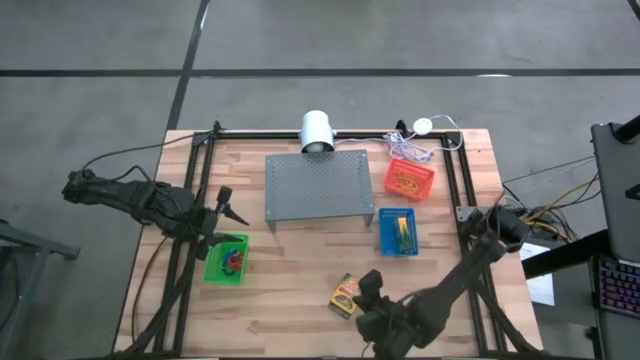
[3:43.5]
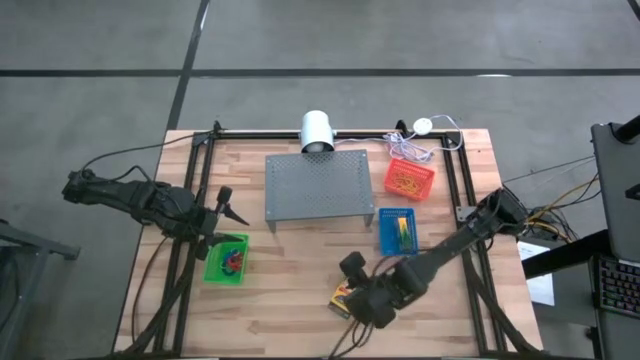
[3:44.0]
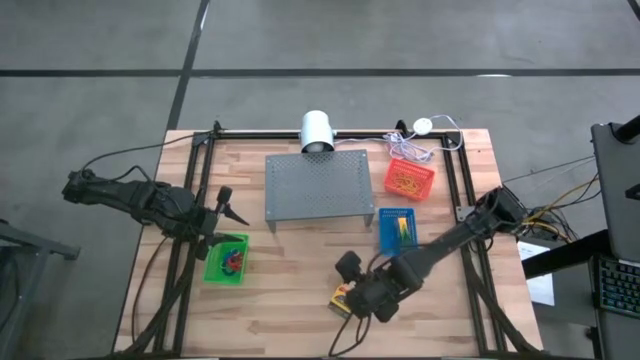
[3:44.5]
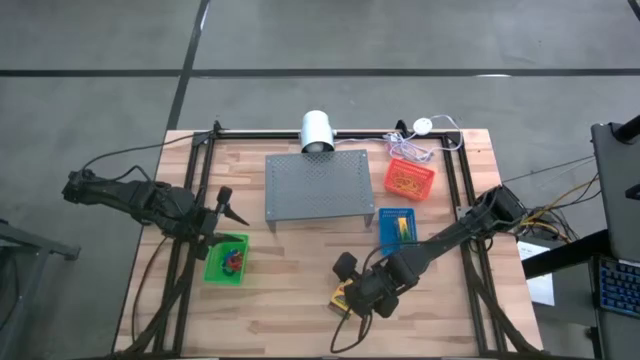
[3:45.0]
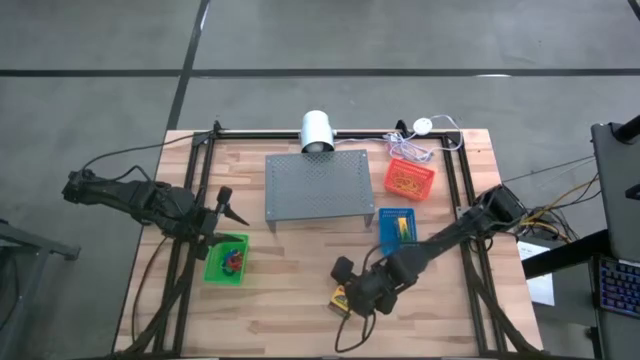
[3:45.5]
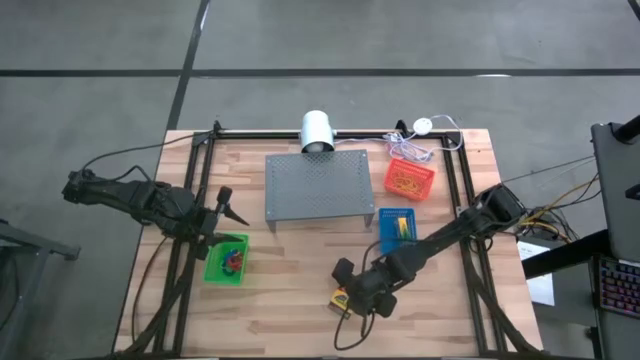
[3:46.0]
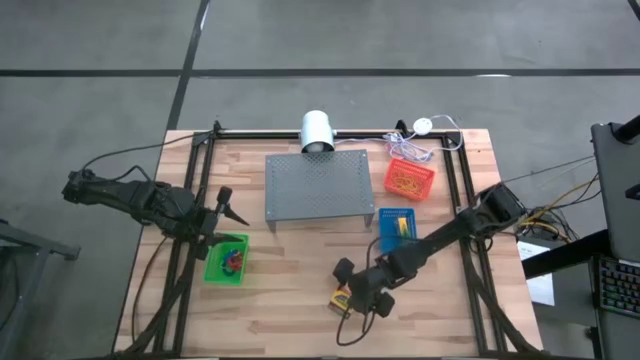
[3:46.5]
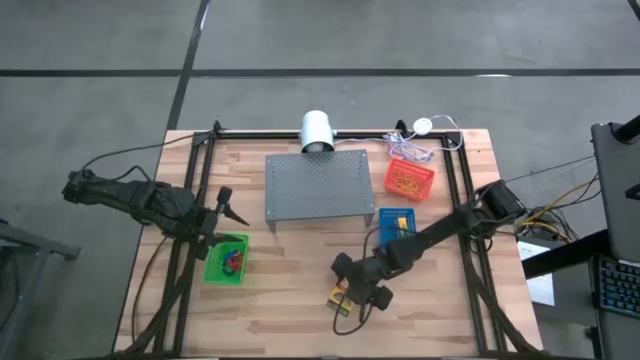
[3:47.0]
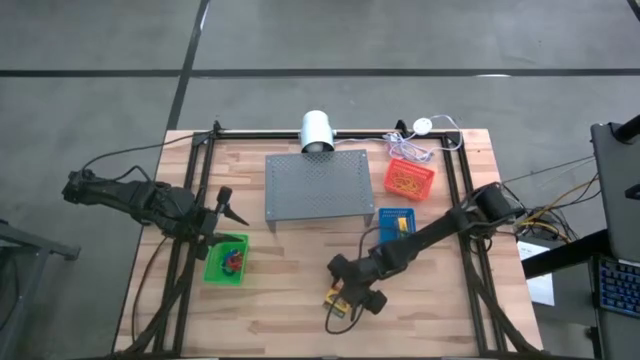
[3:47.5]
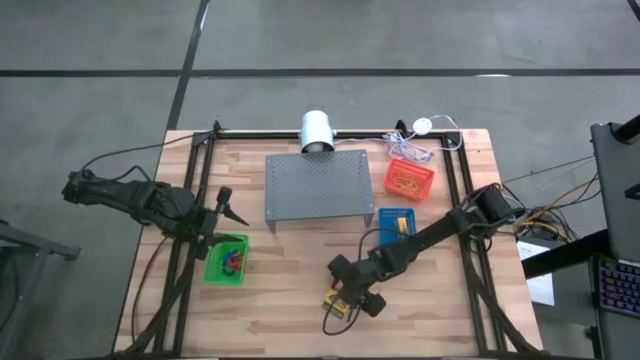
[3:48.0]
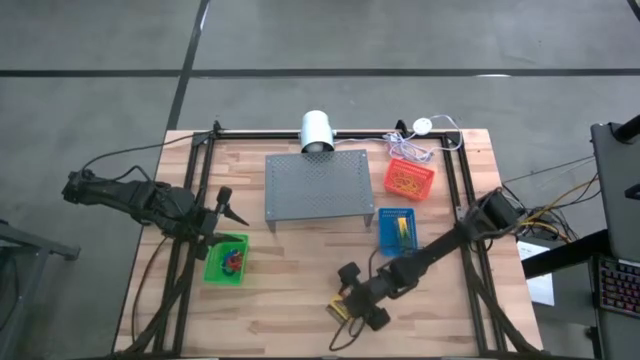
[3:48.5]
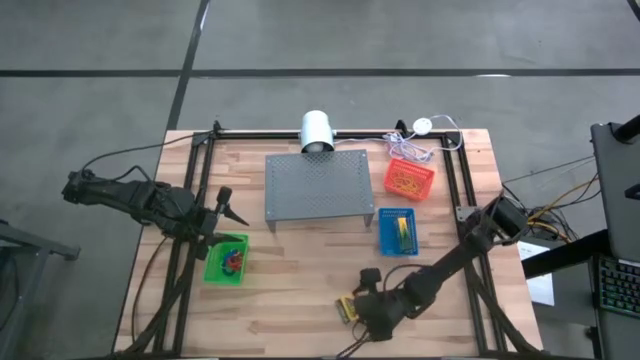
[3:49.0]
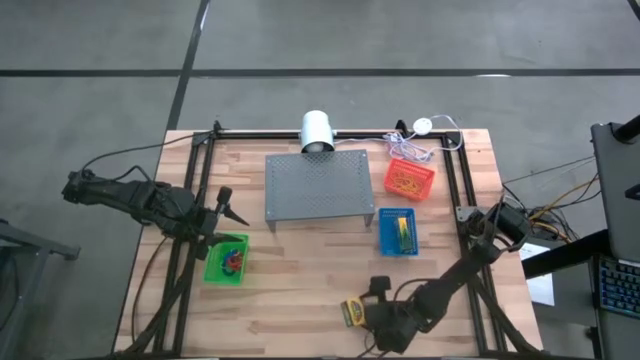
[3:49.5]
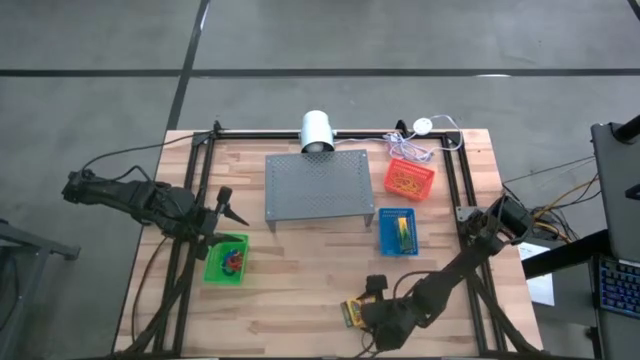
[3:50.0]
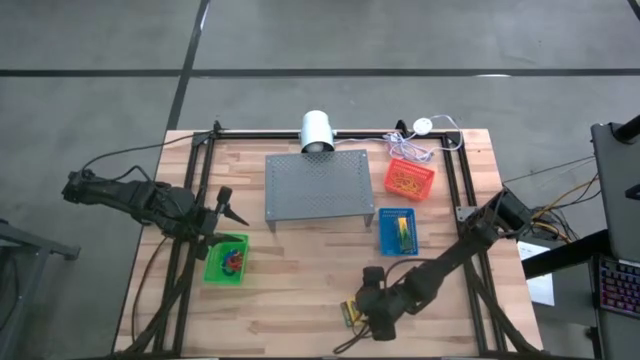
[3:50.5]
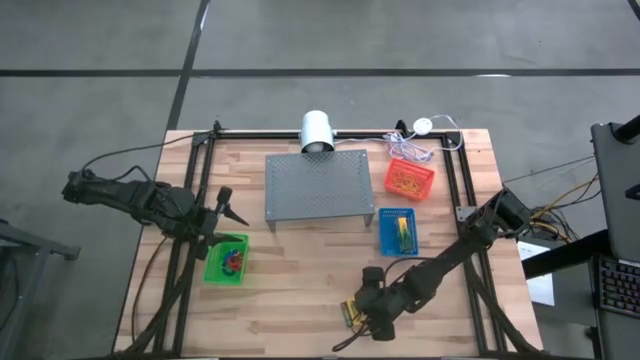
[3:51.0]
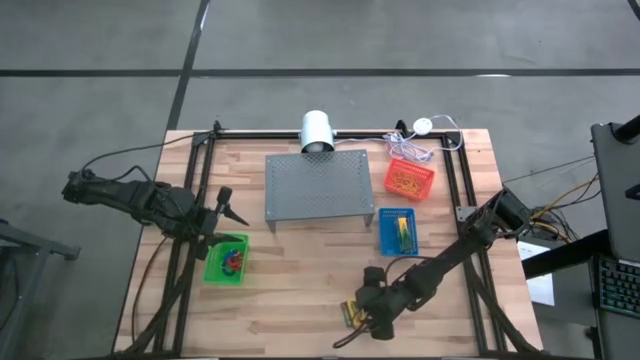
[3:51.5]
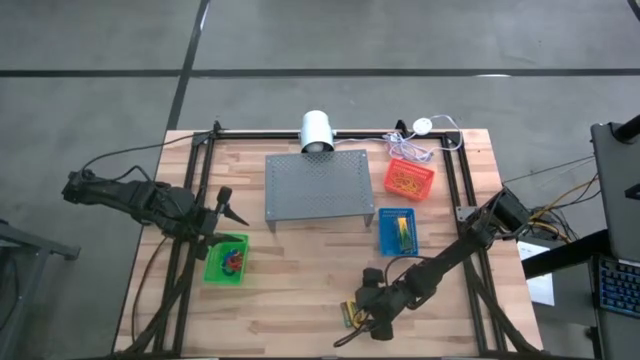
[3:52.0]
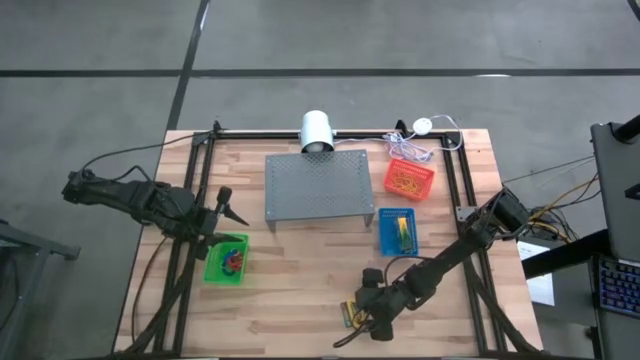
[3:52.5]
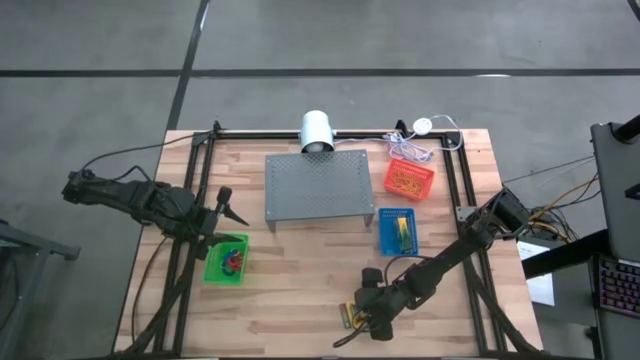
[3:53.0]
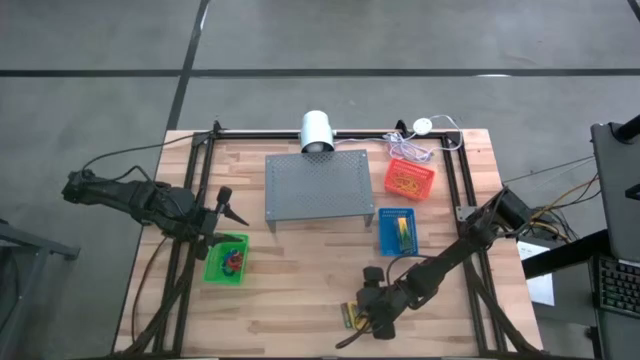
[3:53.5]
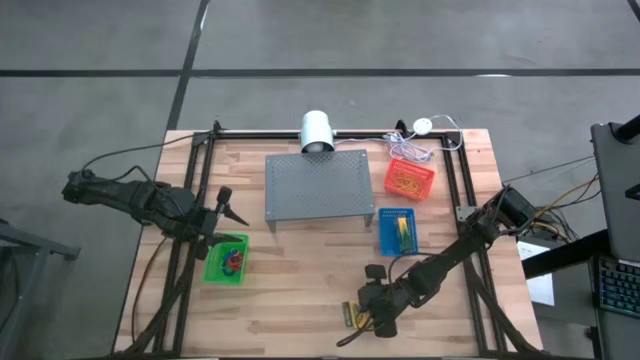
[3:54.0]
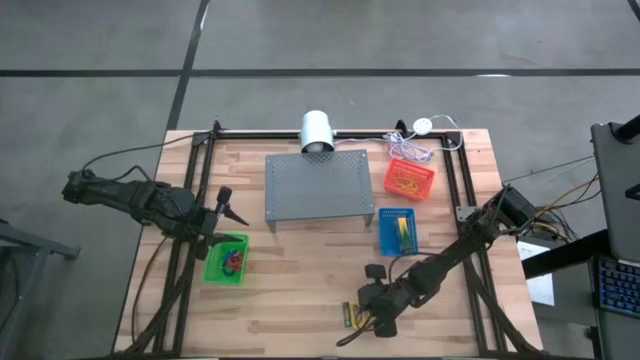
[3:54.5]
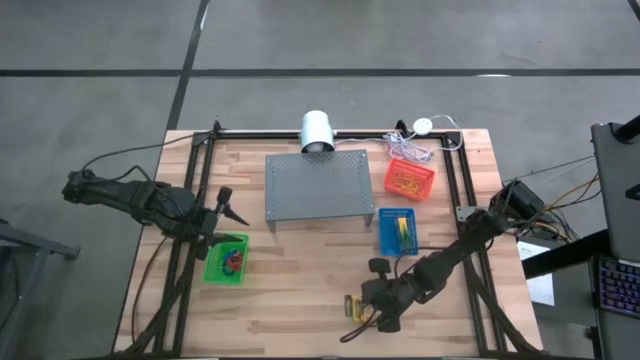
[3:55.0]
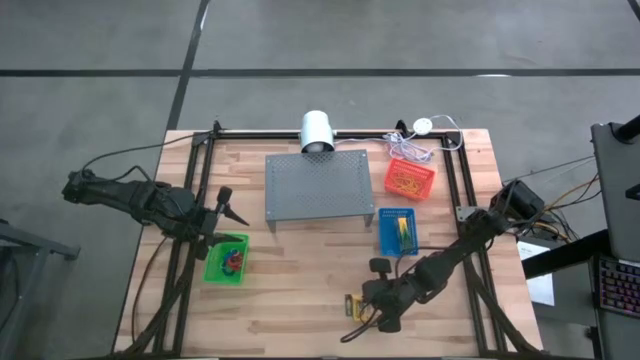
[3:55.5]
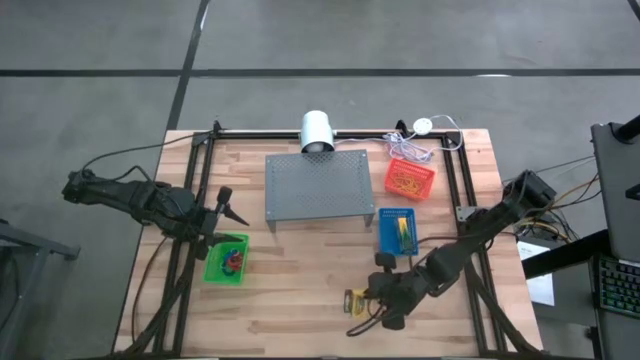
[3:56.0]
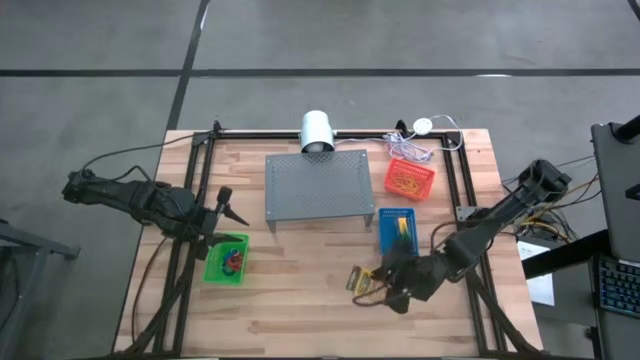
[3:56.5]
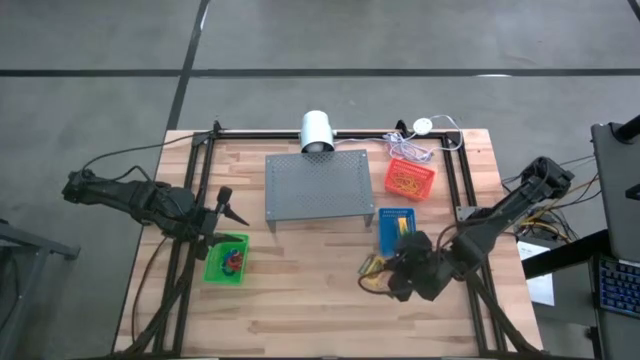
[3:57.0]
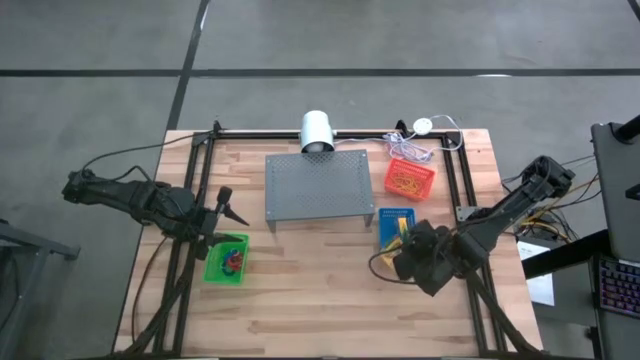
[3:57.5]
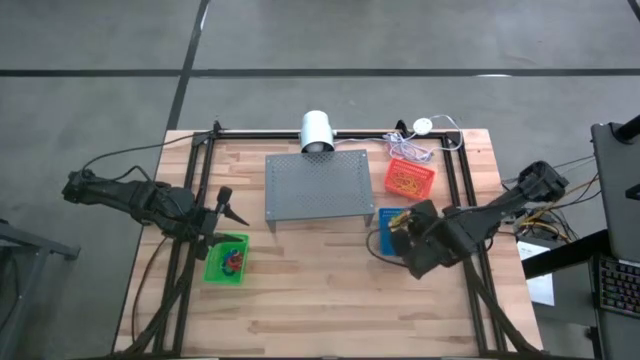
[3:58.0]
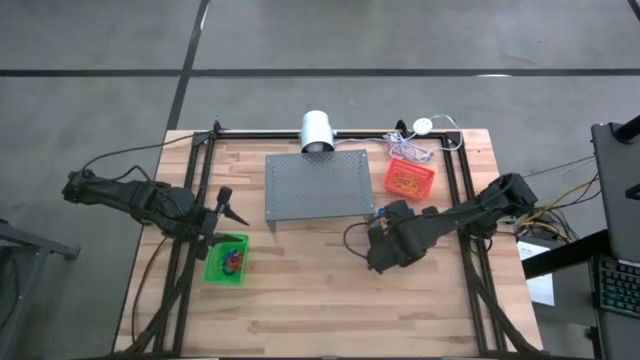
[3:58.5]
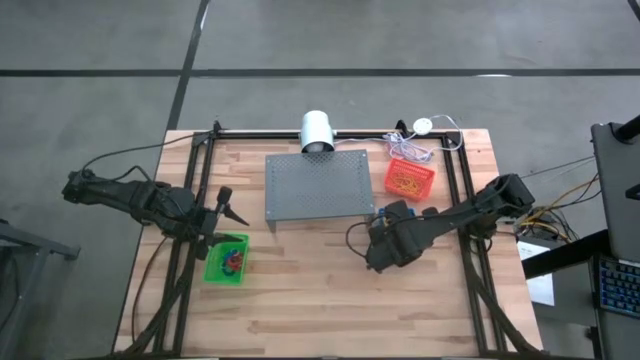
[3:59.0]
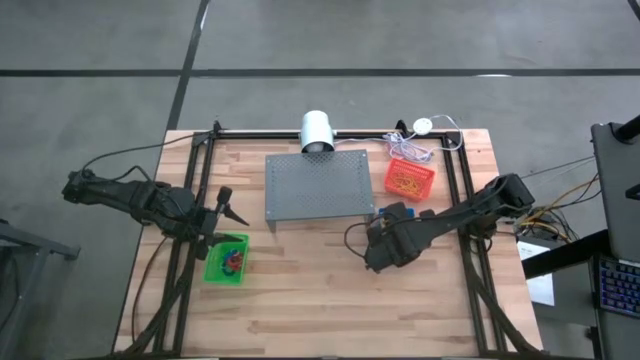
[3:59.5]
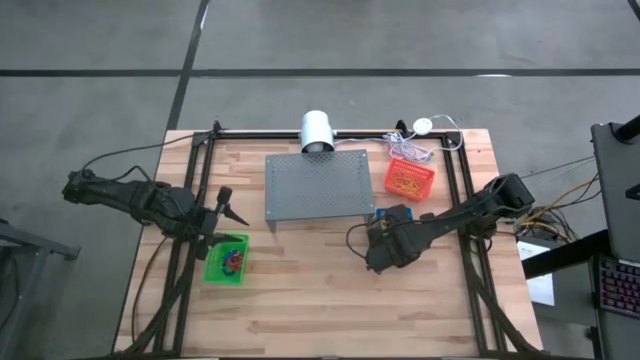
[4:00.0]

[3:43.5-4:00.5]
Task: Pick & Place Office Desk Supplies
Put the yellow crayons into the blue bin

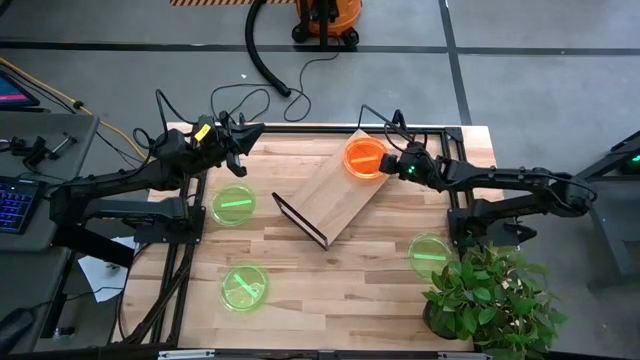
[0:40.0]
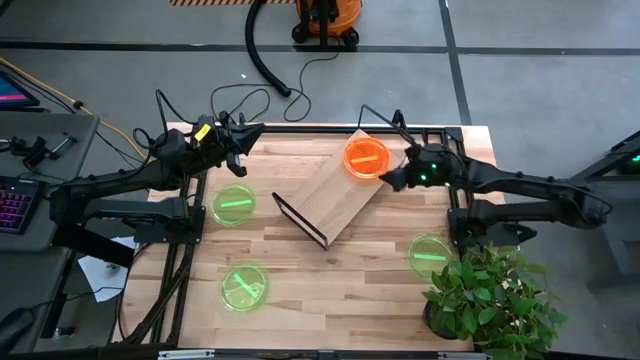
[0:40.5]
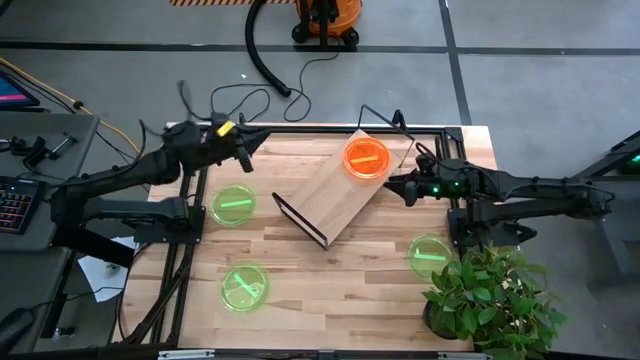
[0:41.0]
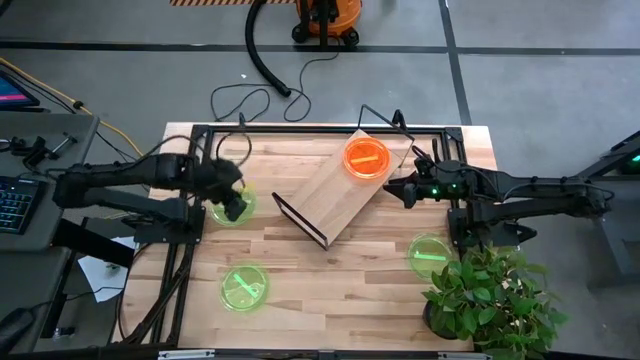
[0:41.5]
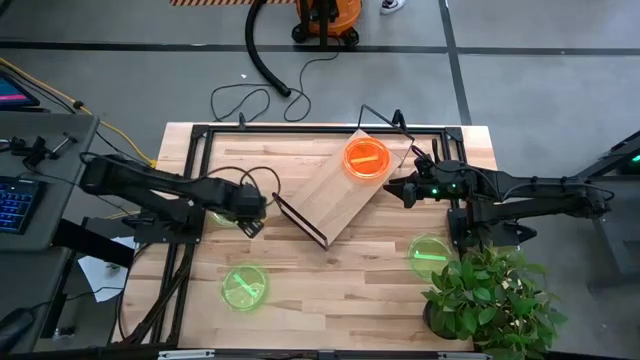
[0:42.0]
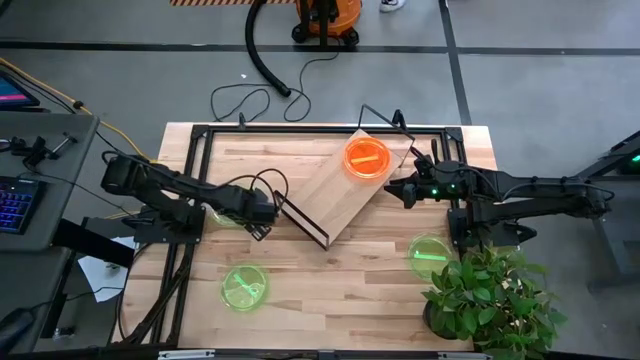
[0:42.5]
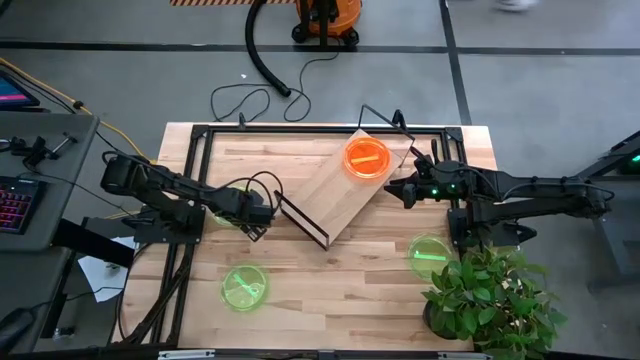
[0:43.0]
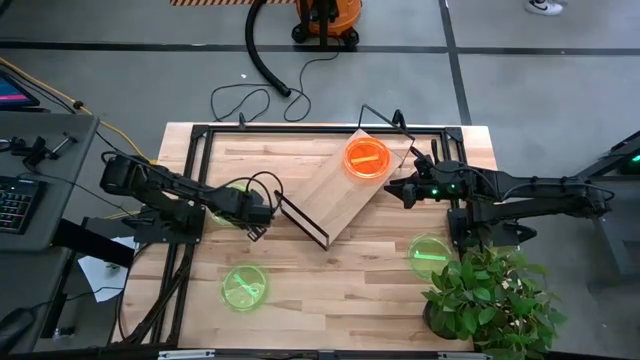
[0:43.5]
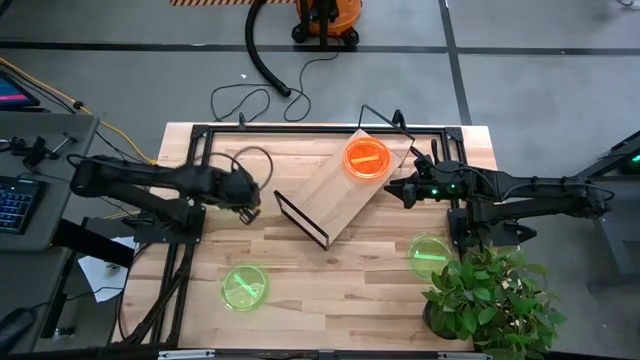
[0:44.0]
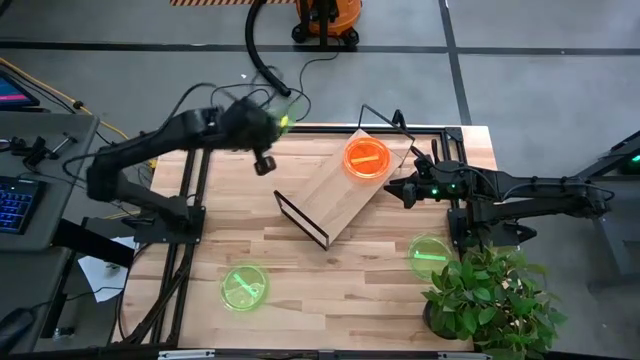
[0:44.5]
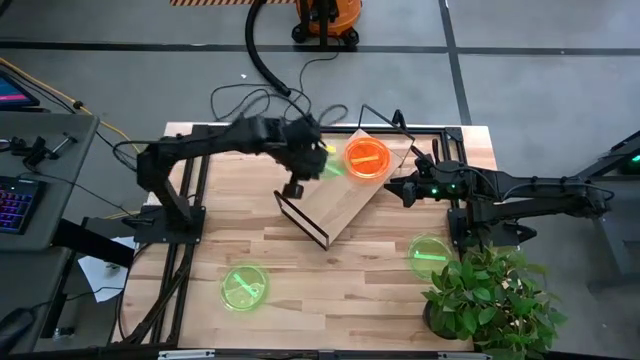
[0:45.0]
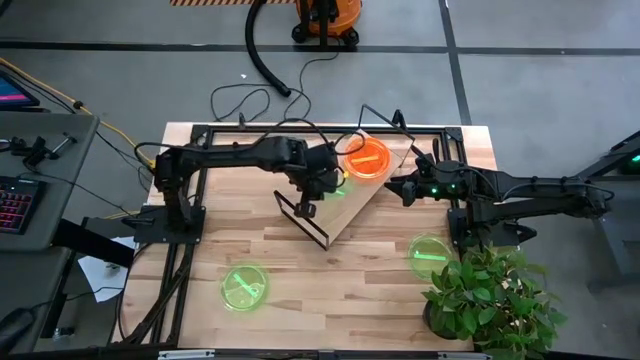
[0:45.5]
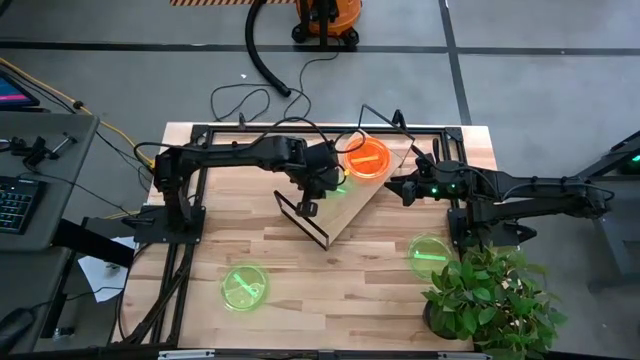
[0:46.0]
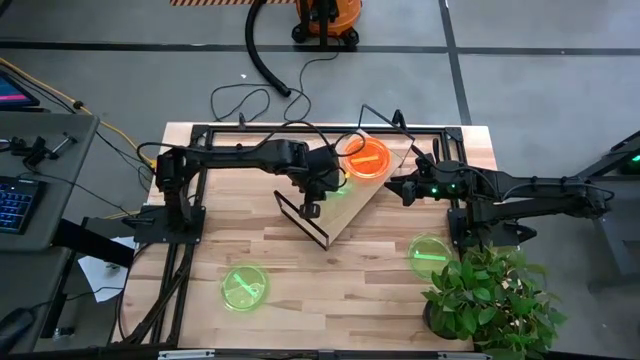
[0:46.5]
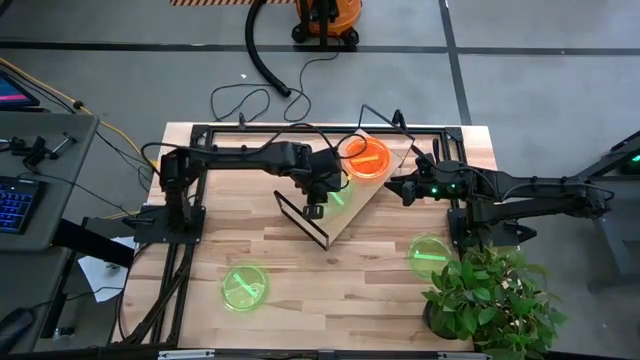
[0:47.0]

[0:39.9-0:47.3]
Task: Place and stack plates onto a shelf
Put the top left green plate on the shelf
